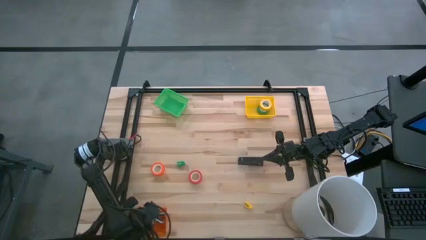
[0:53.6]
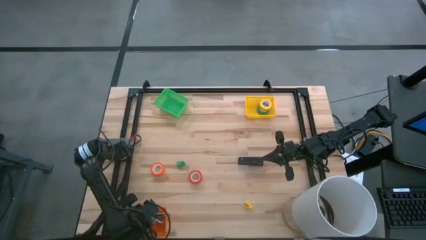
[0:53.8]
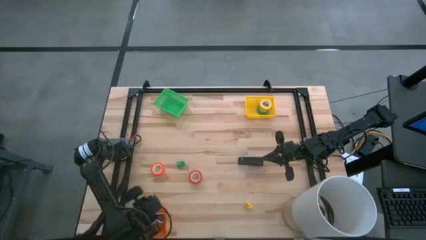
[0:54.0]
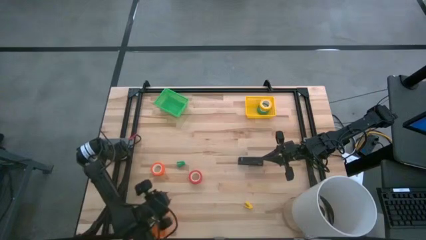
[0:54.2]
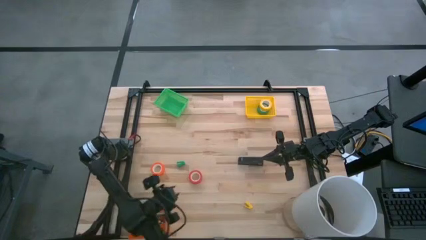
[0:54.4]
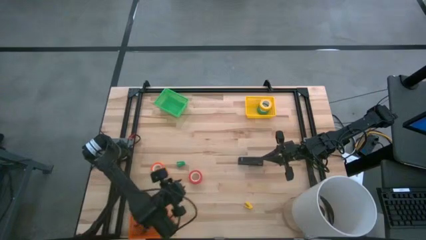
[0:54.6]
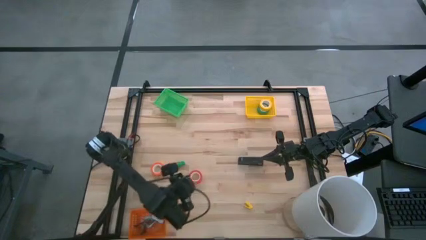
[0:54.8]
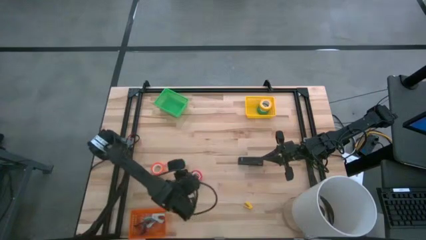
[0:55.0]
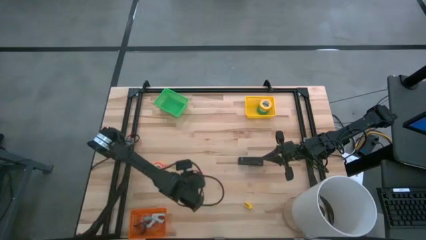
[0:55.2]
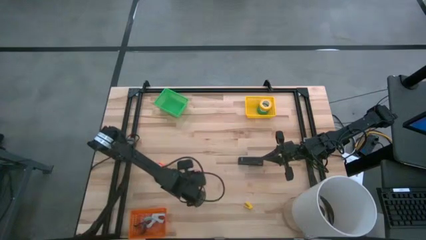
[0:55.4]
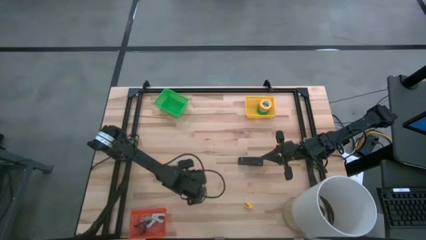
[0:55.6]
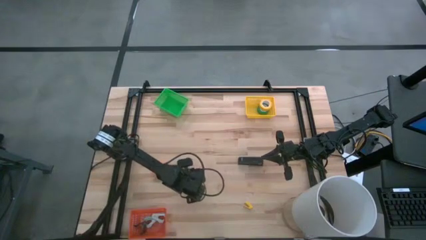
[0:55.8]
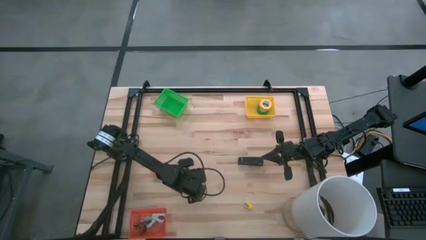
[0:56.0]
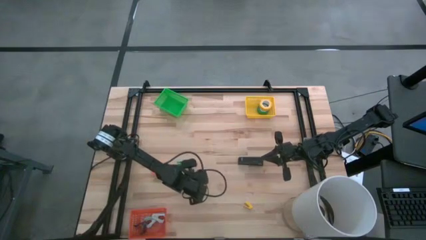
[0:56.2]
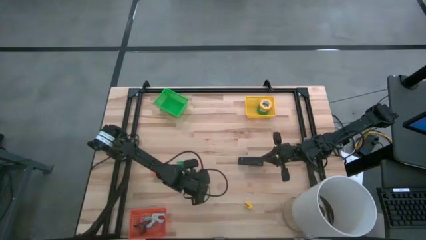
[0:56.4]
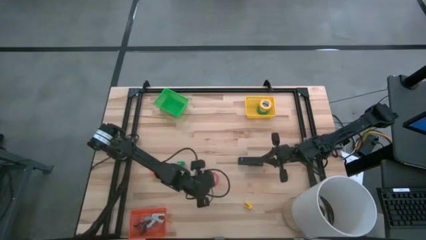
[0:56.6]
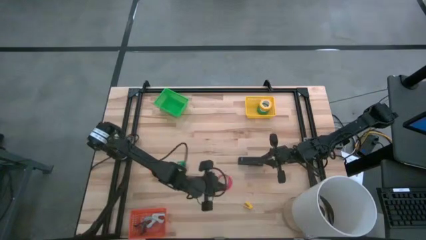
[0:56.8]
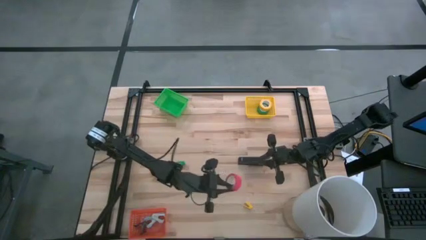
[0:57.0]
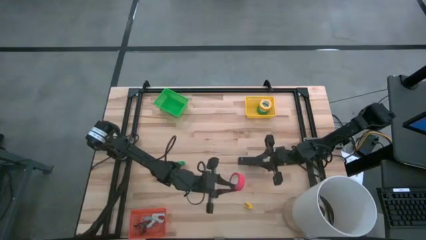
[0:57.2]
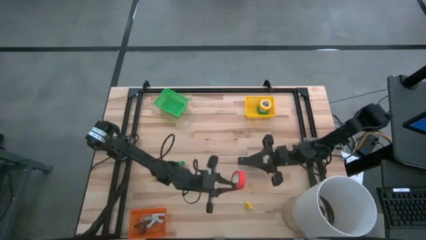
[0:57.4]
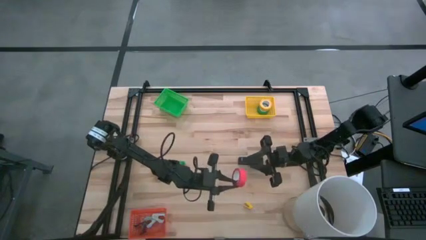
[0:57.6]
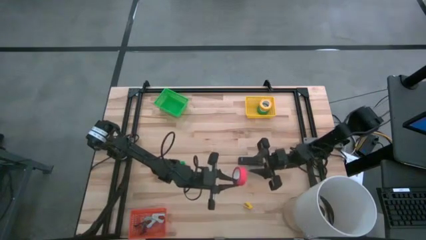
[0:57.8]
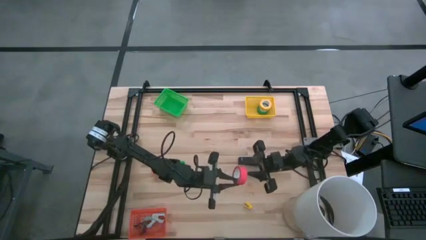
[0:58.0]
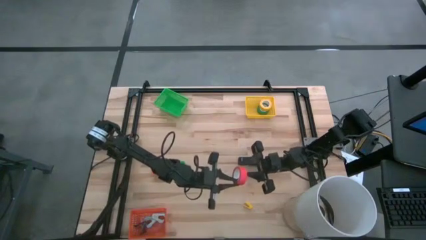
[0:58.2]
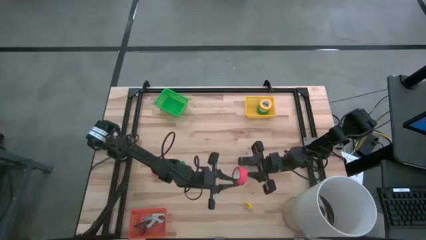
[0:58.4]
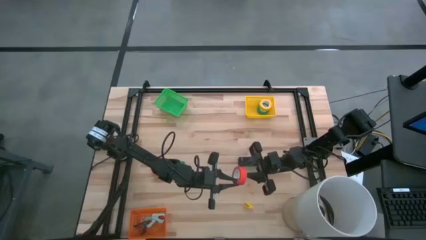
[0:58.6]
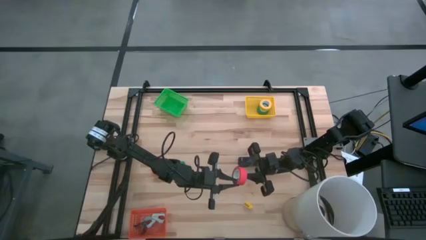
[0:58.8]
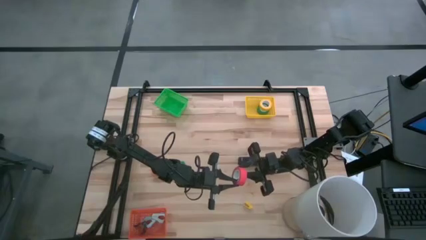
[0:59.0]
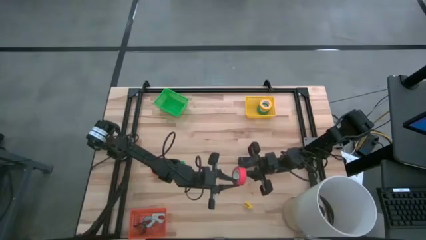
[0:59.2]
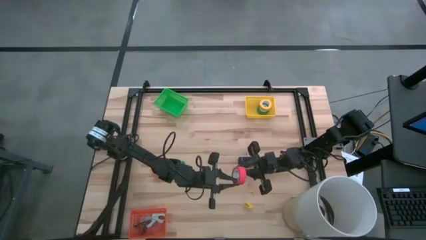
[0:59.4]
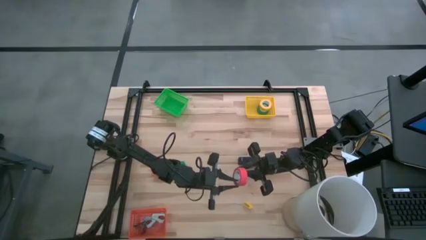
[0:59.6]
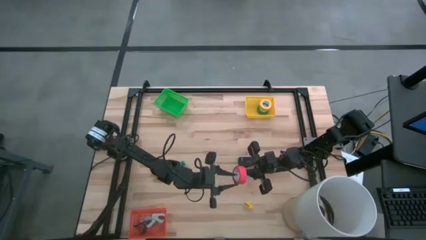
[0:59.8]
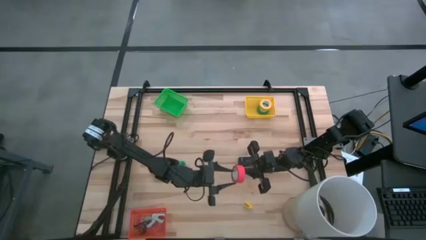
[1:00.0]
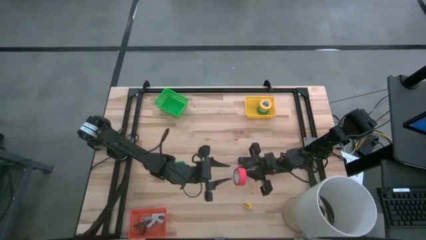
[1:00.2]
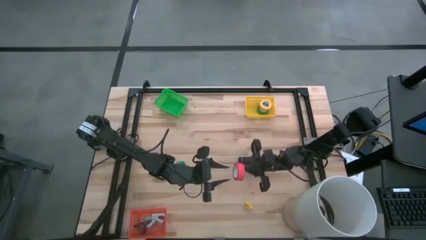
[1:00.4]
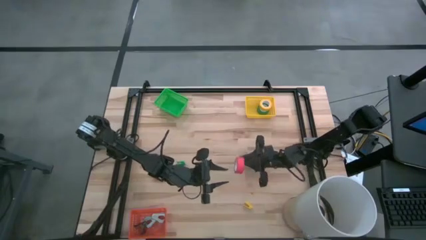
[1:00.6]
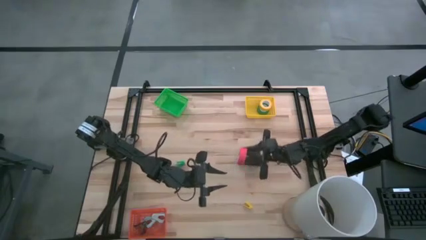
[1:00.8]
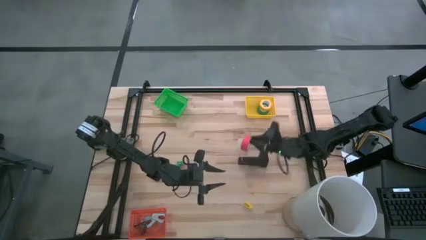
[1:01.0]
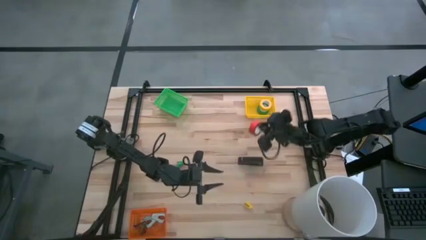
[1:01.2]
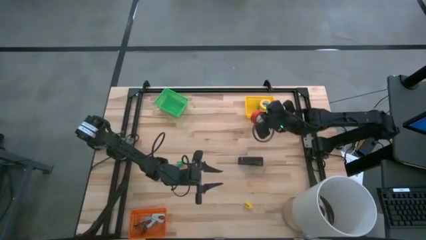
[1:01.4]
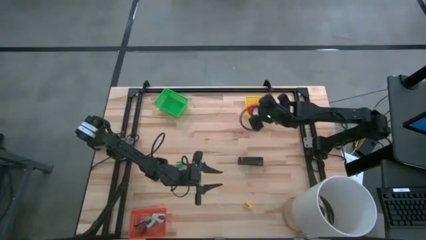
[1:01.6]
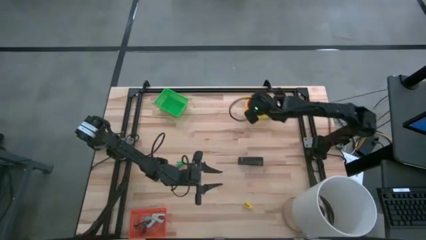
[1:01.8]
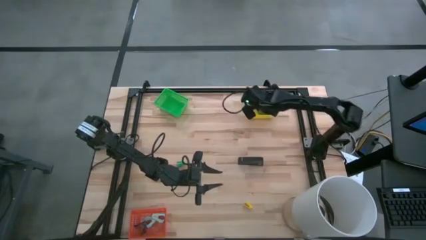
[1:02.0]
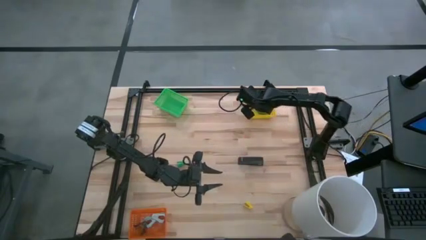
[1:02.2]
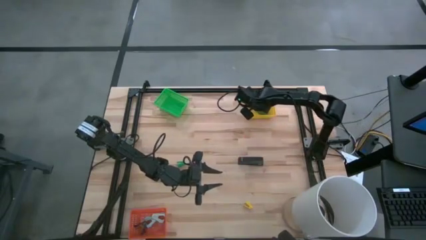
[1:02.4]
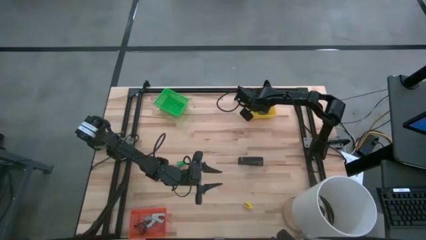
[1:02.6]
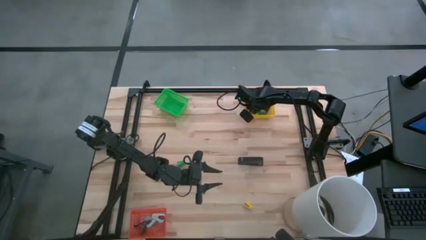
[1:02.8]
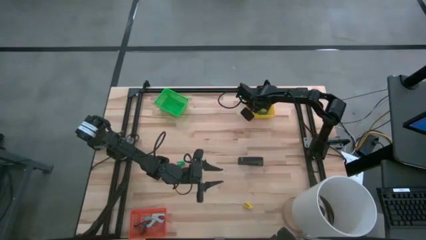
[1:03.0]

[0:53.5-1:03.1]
Task: Pick and place Stapler, Stapler remover, tape
Put the red tape into the yellow bin

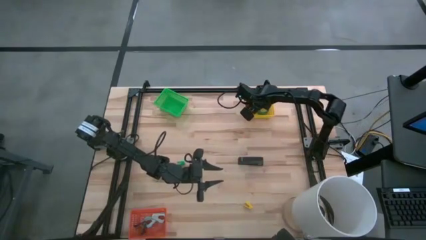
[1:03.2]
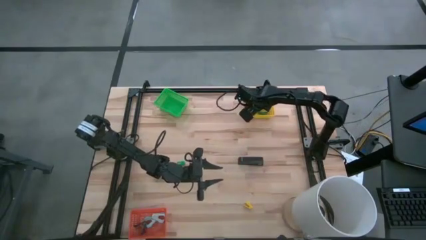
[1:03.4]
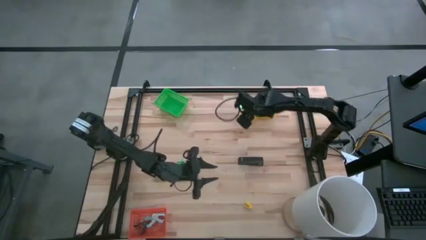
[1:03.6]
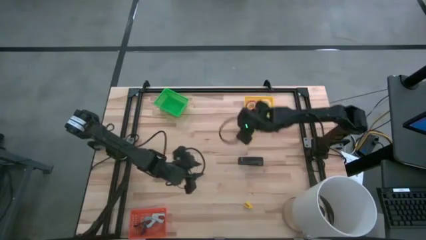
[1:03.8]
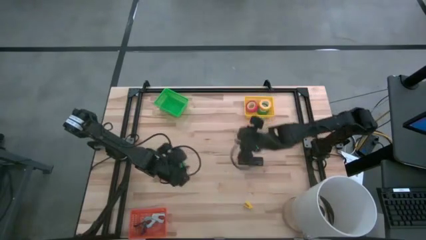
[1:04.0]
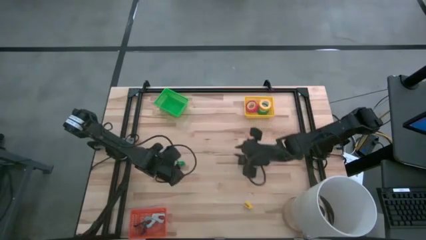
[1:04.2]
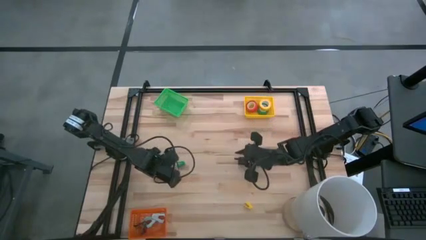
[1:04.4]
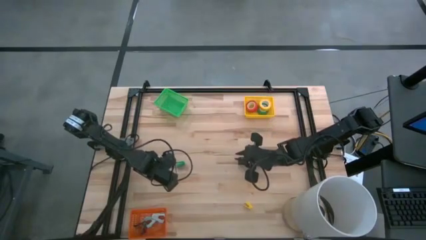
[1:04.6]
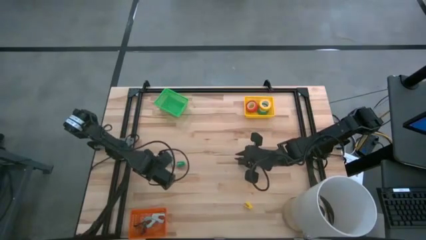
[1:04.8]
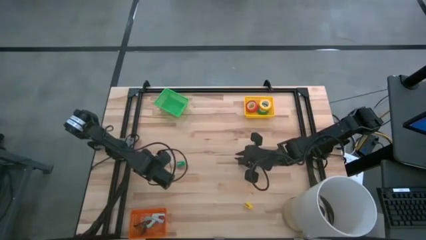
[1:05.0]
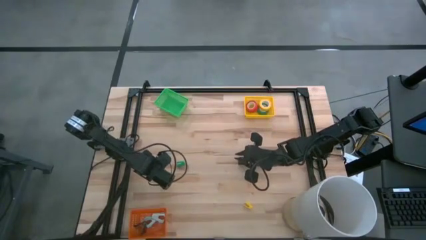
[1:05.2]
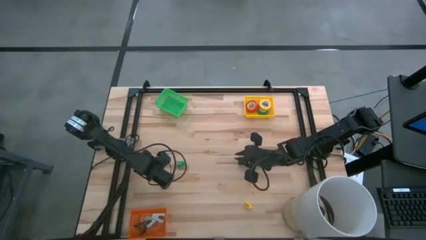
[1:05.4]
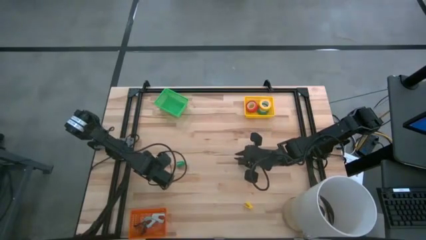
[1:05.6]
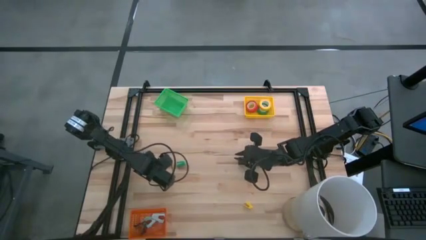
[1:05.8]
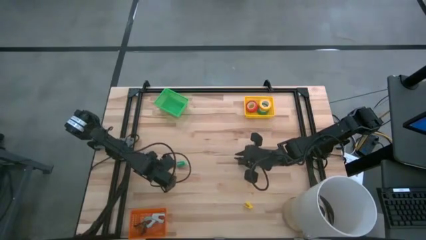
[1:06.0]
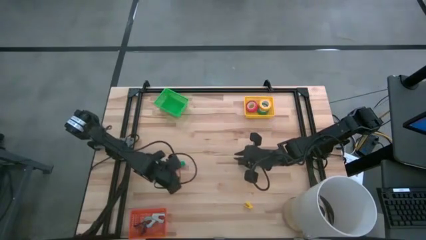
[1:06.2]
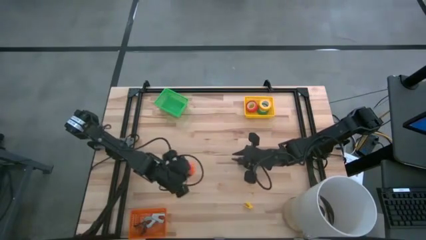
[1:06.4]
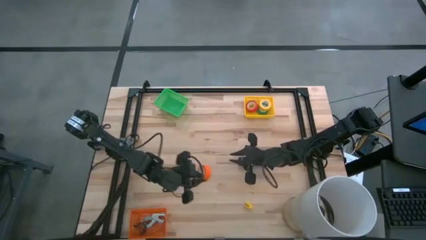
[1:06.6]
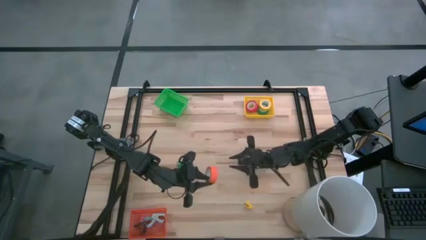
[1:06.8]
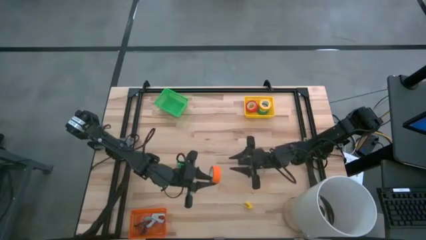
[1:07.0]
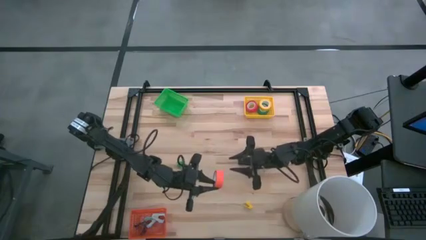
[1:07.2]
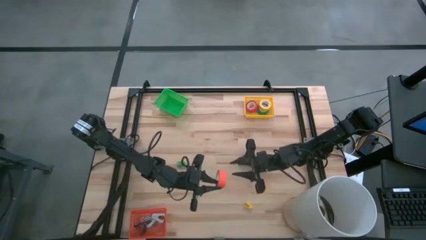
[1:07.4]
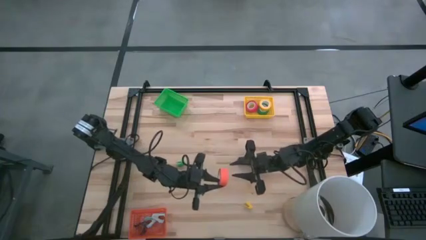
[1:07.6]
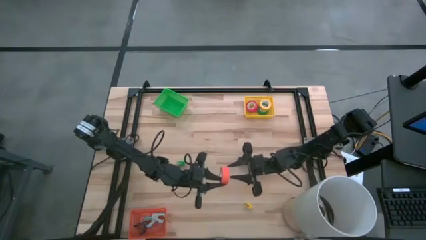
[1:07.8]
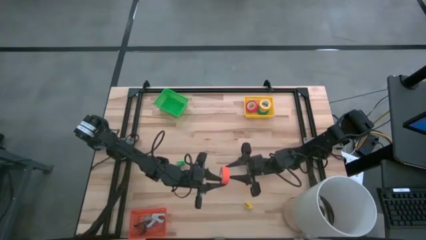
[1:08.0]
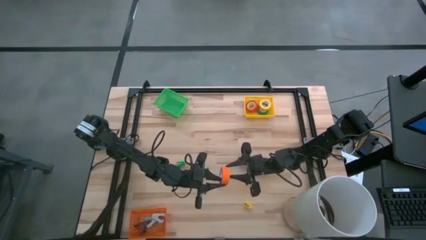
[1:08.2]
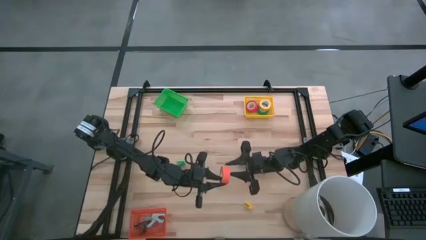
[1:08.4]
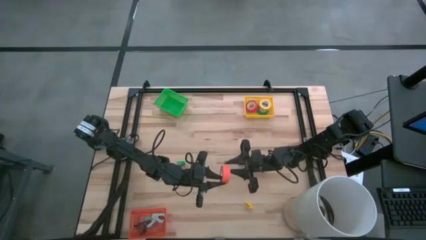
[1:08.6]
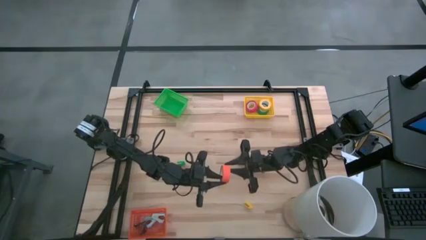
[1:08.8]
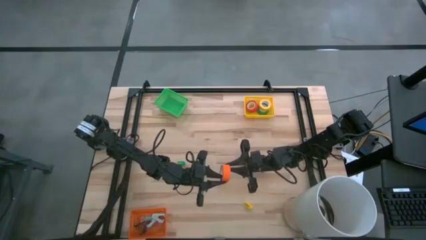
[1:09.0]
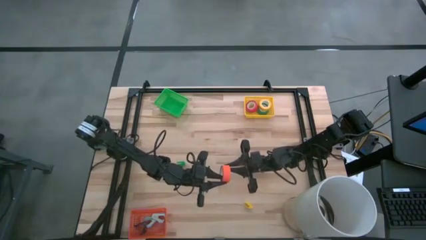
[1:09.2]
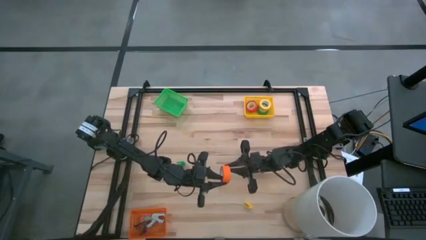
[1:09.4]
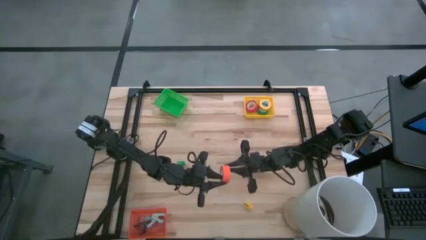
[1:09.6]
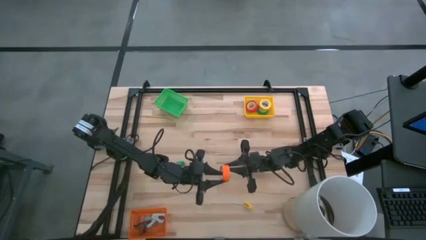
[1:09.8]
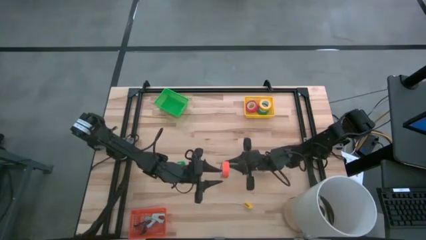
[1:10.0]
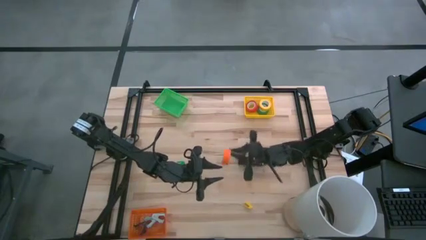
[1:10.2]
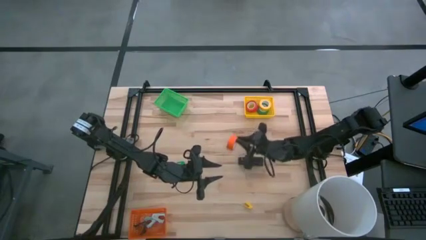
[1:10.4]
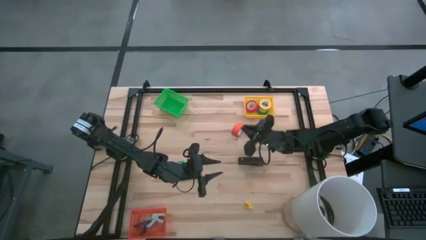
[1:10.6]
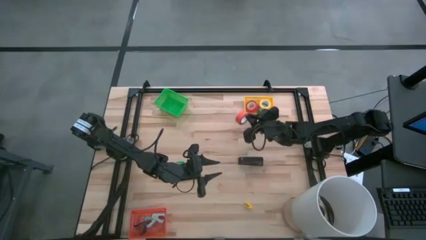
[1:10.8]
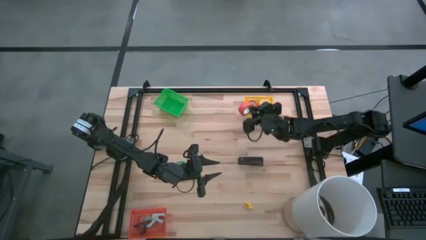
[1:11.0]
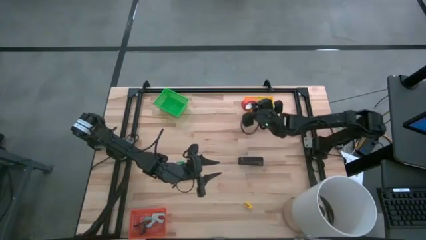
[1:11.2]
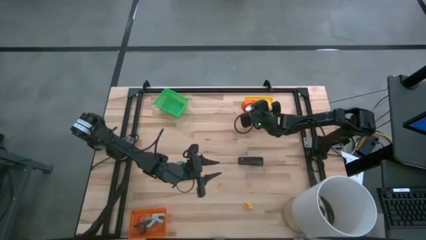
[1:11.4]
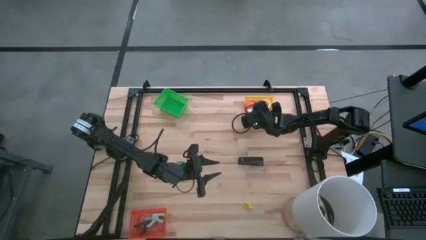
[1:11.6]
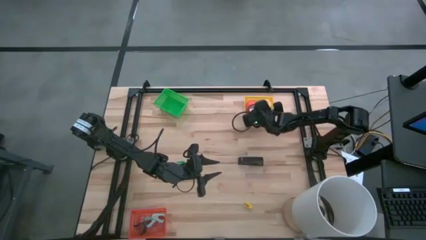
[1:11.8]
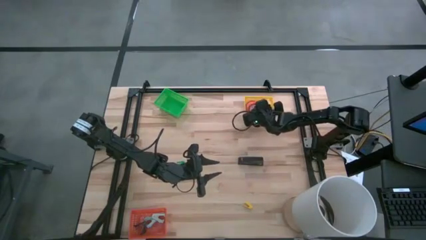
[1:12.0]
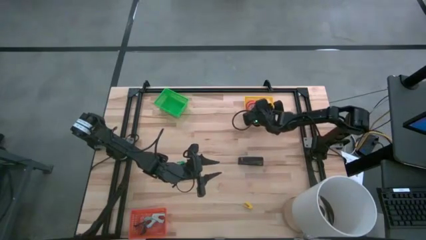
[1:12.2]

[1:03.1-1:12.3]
Put the orange tape into the yellow bin
